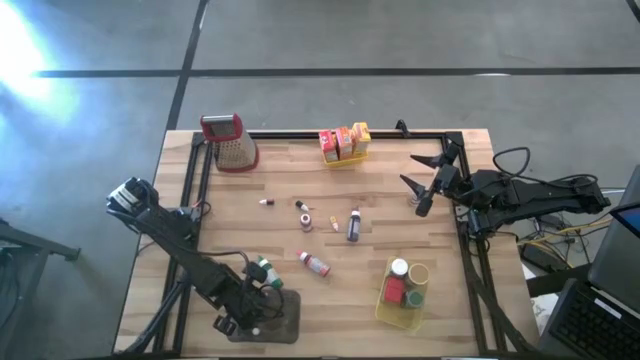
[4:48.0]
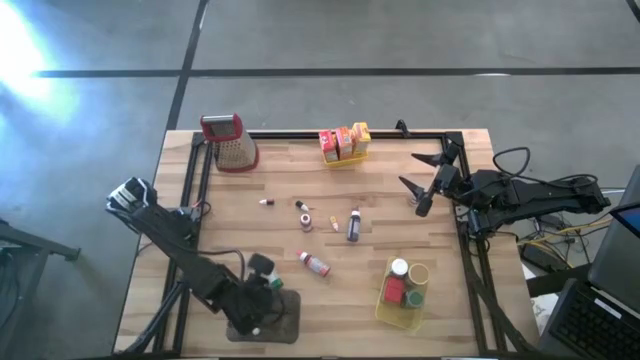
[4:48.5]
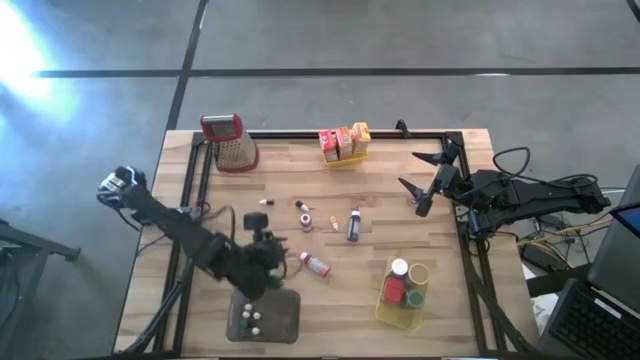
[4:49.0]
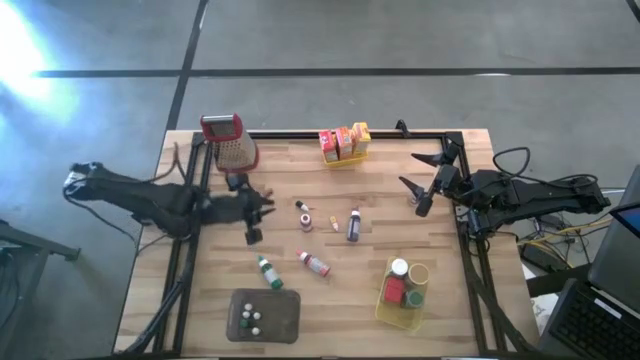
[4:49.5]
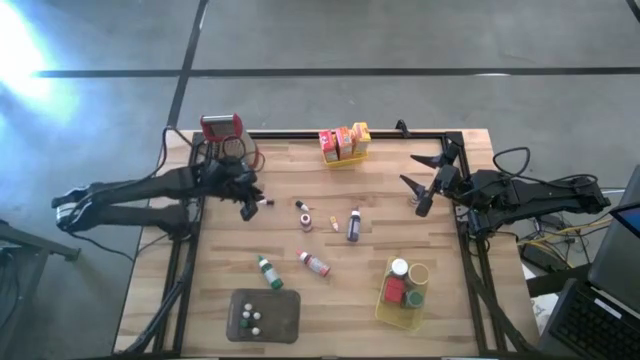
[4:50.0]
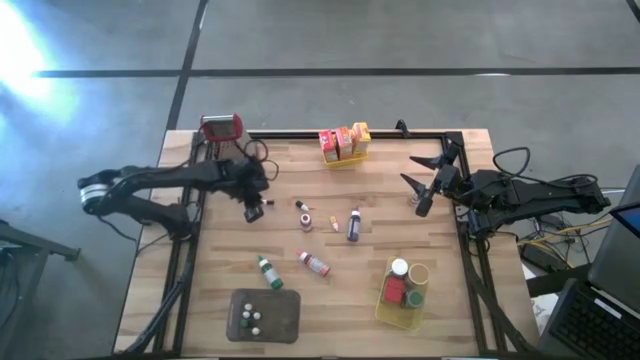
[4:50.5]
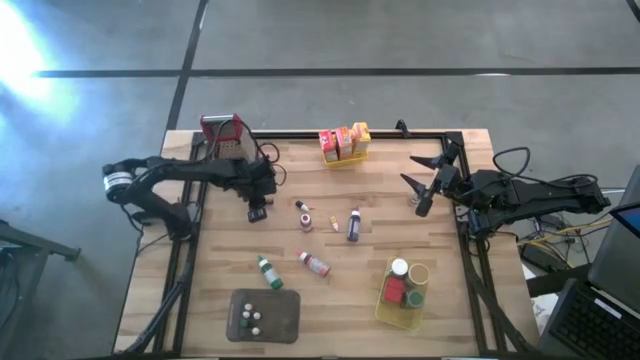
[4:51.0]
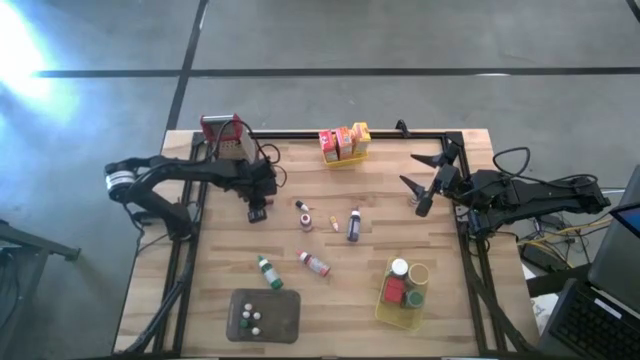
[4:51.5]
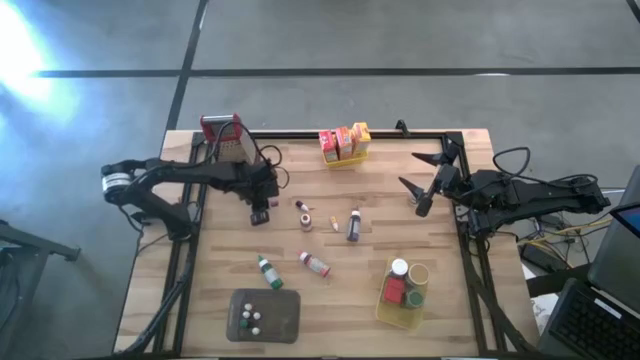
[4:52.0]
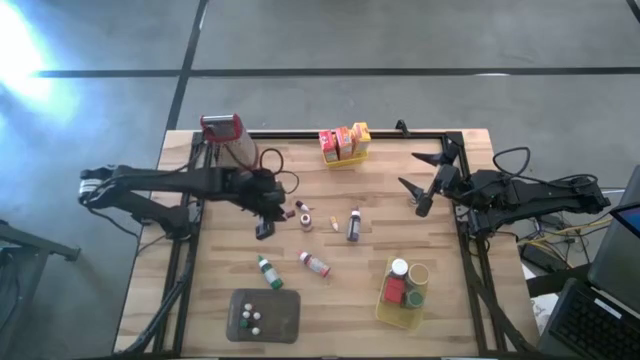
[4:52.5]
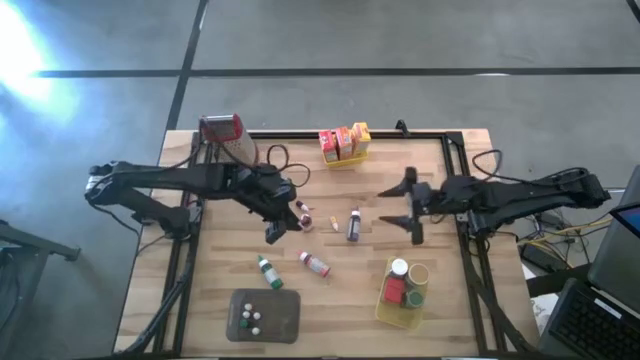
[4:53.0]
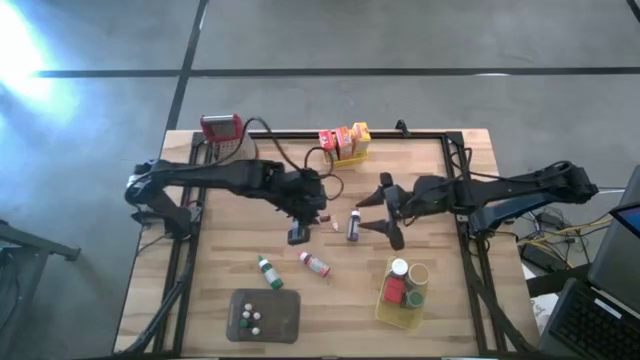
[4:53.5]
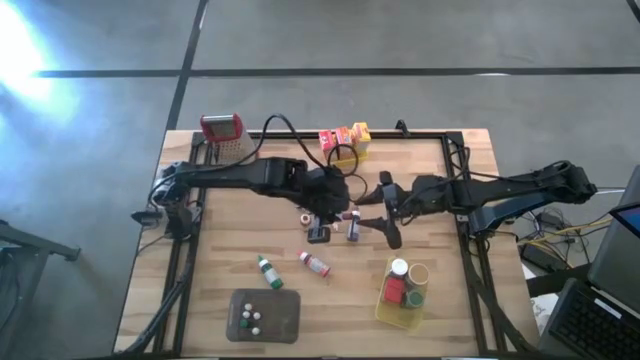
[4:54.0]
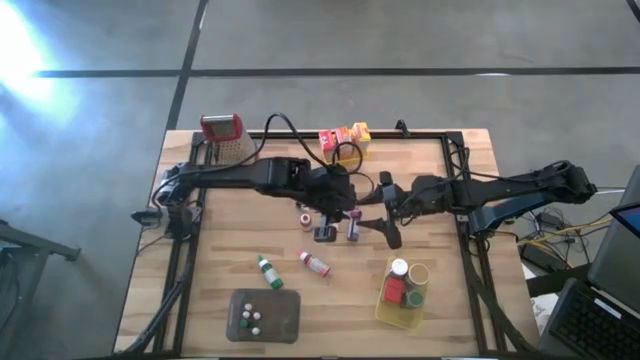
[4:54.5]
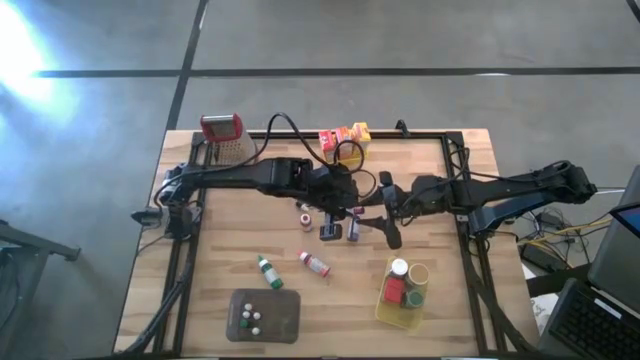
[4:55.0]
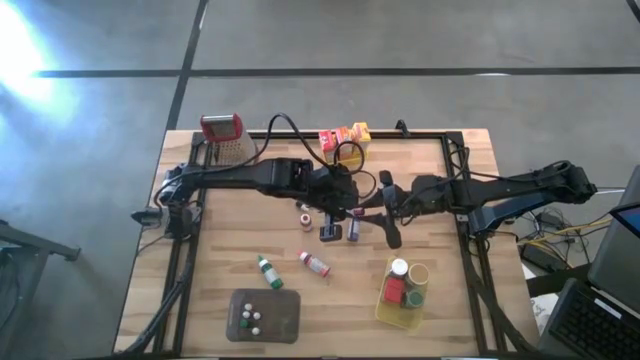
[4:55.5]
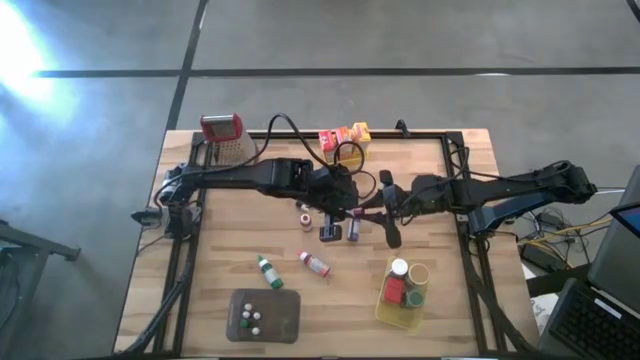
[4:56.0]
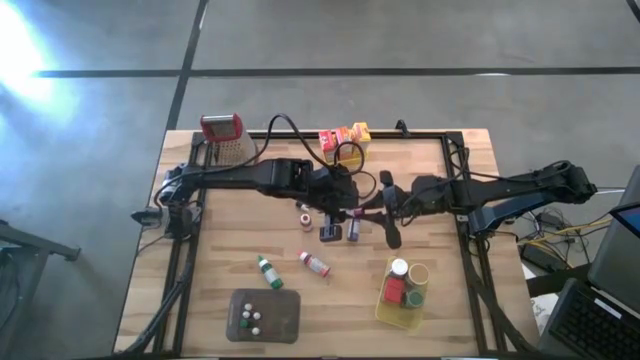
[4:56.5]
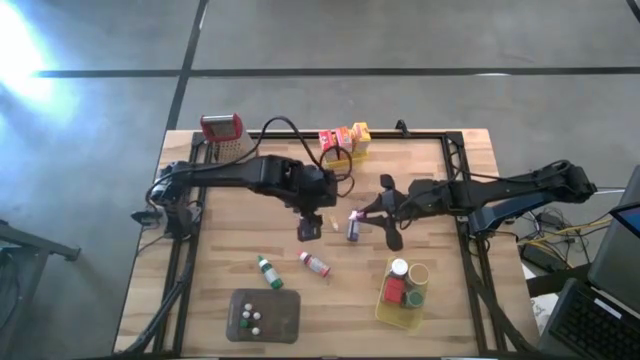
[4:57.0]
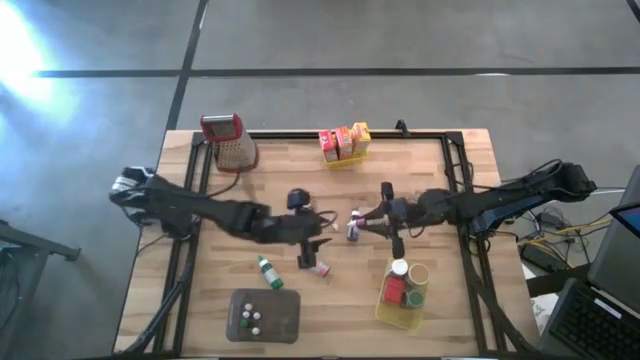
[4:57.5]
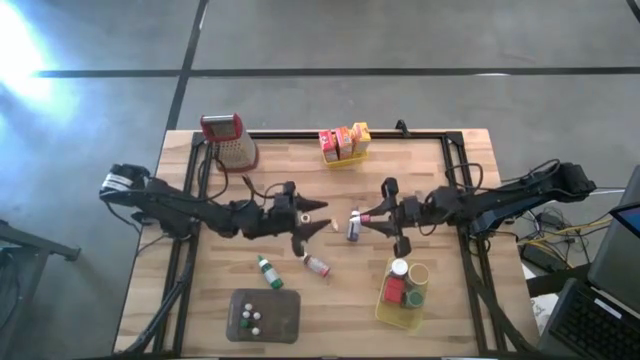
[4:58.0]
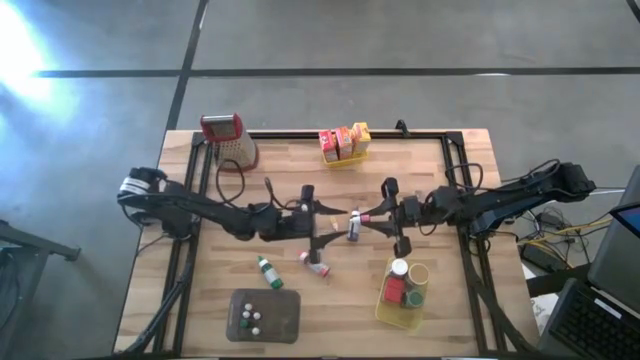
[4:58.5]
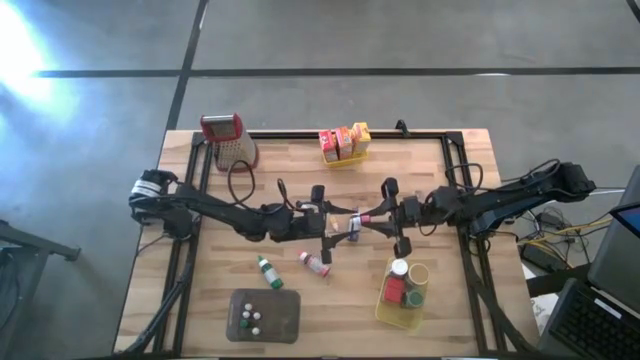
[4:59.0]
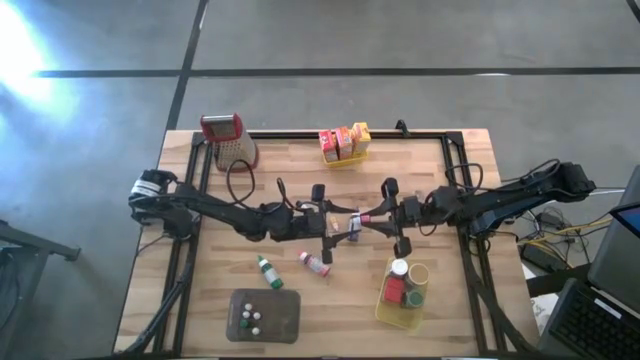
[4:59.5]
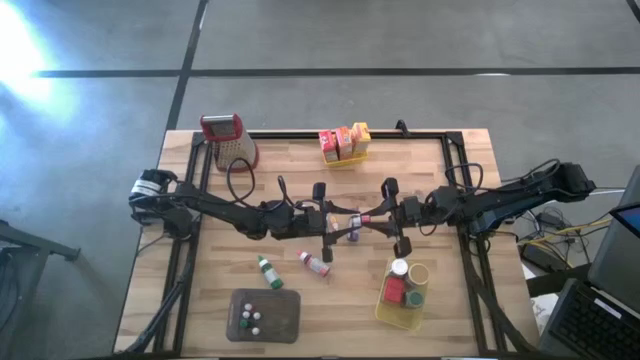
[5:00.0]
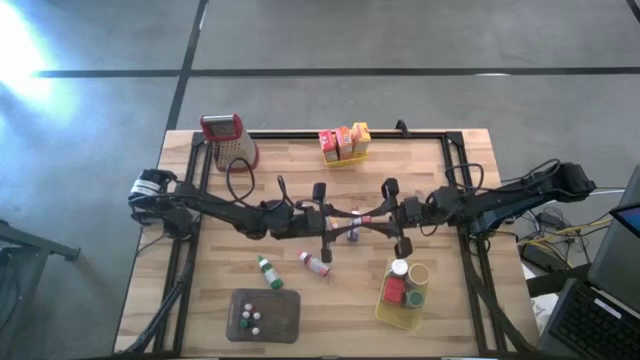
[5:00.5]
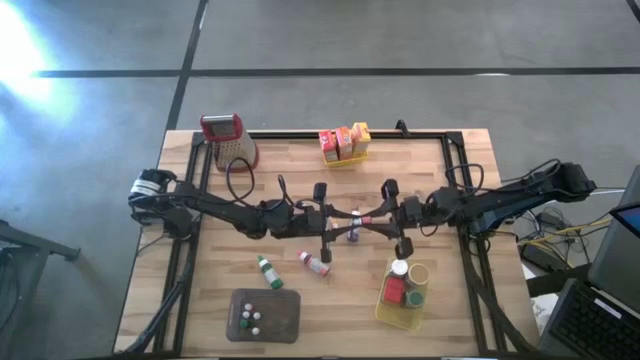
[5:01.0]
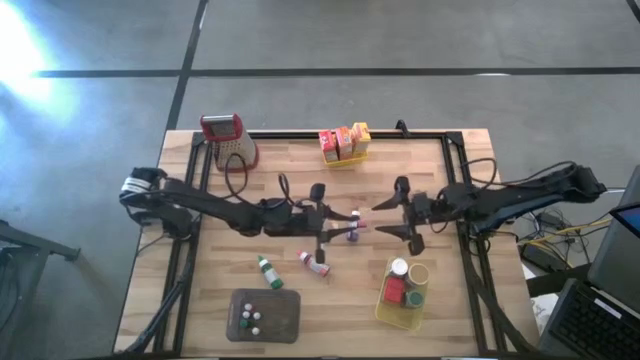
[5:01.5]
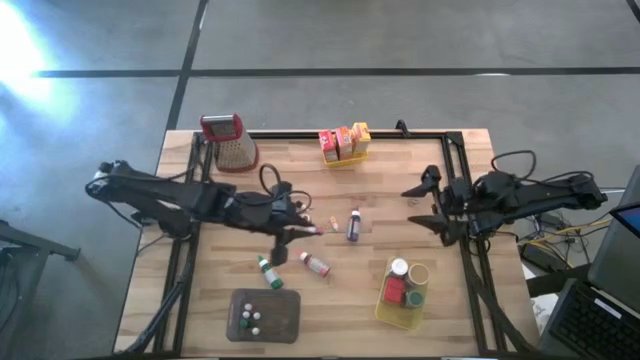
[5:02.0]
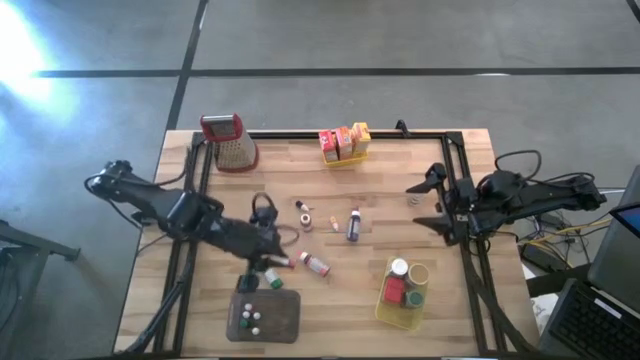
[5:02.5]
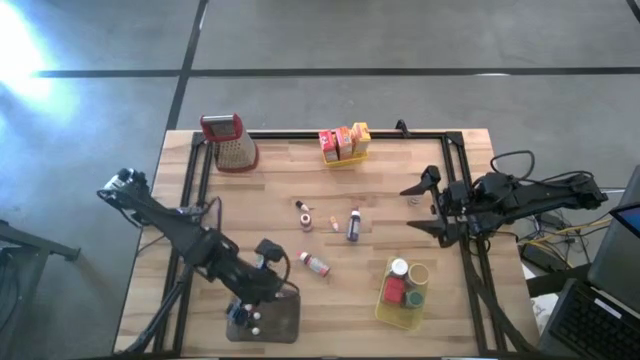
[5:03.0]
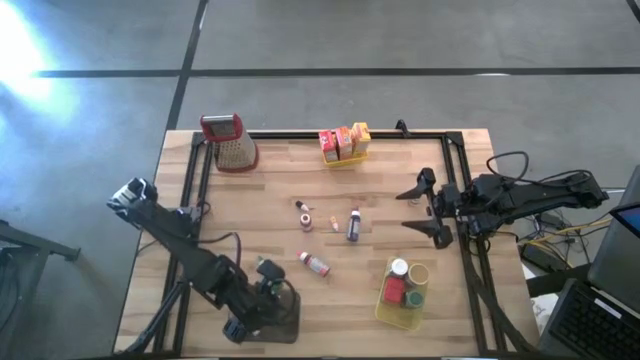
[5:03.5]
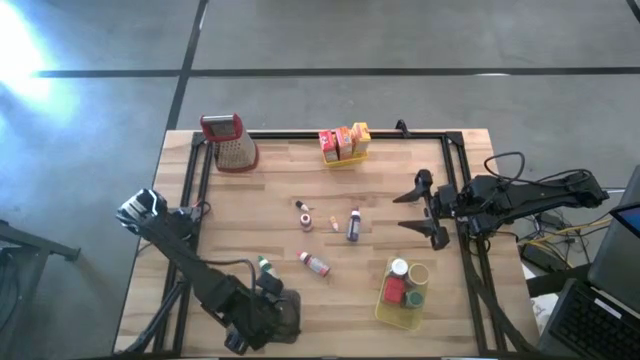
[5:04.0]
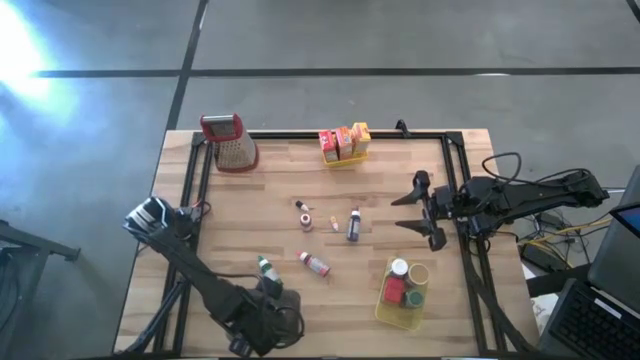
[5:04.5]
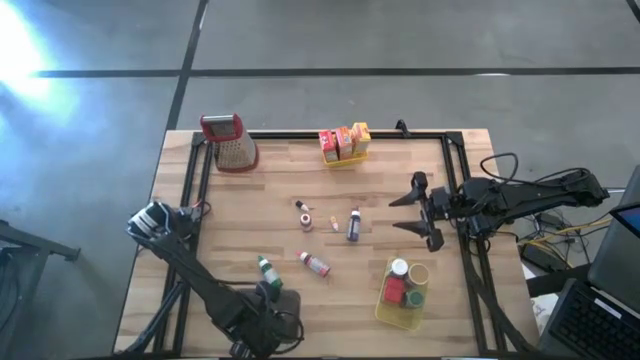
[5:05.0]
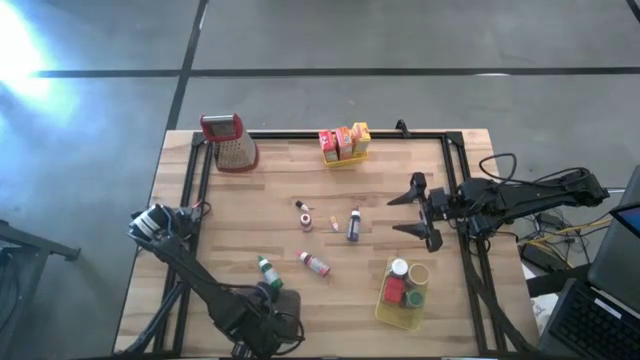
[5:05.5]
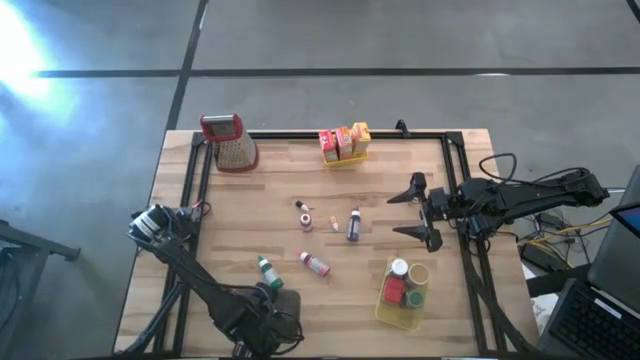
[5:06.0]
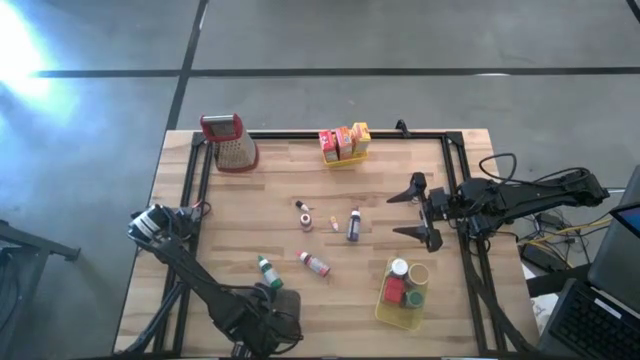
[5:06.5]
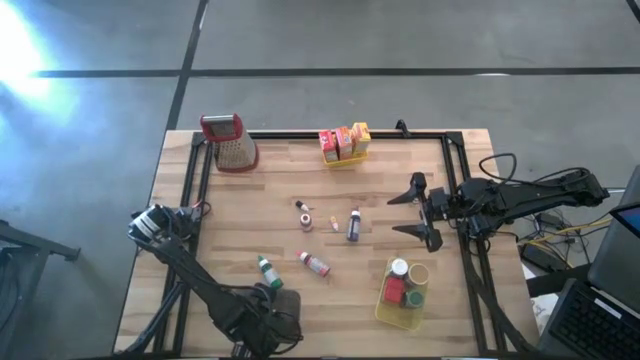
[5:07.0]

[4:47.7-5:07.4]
Task: Pick & Place Kitchen Items
Put the small pink food coloring bottle into the black bin

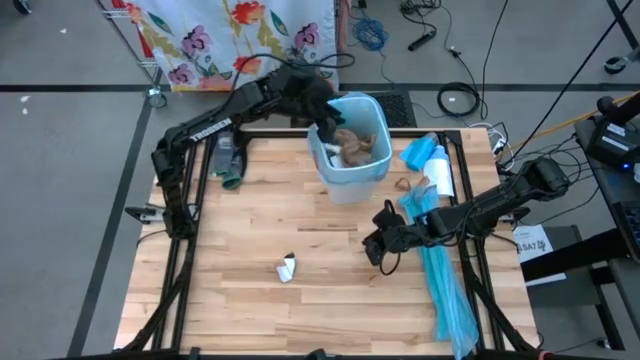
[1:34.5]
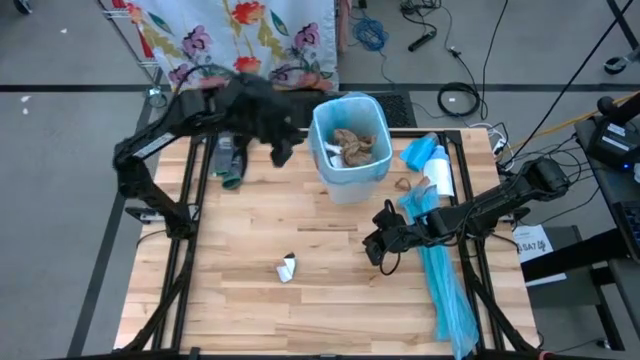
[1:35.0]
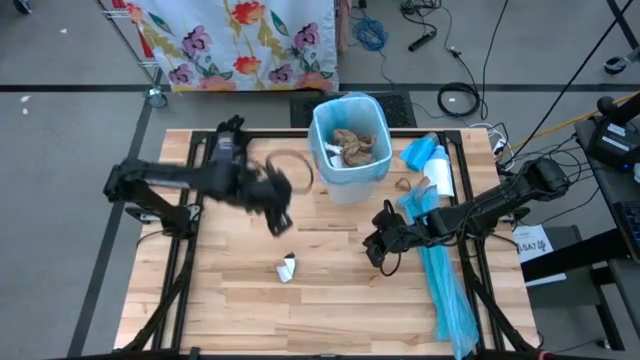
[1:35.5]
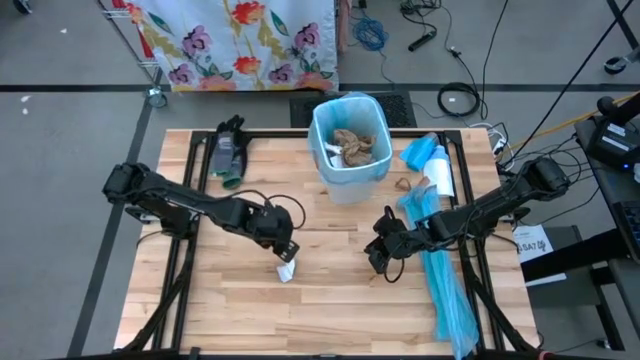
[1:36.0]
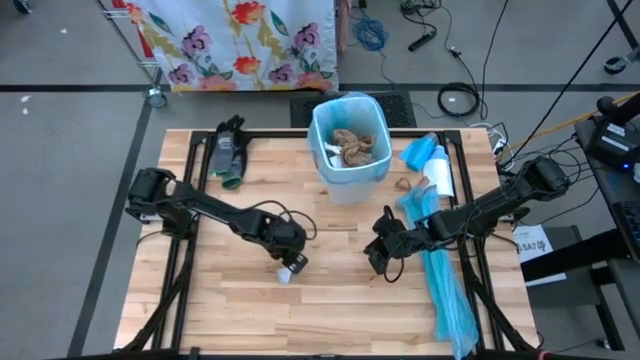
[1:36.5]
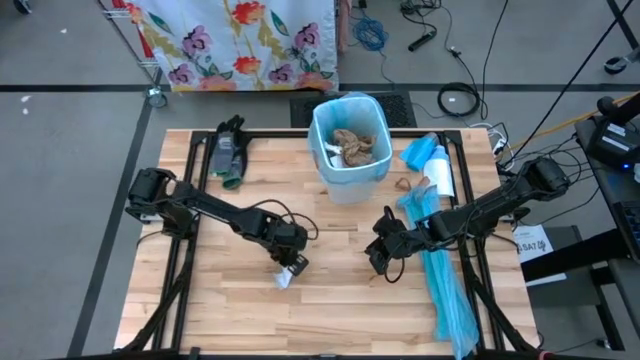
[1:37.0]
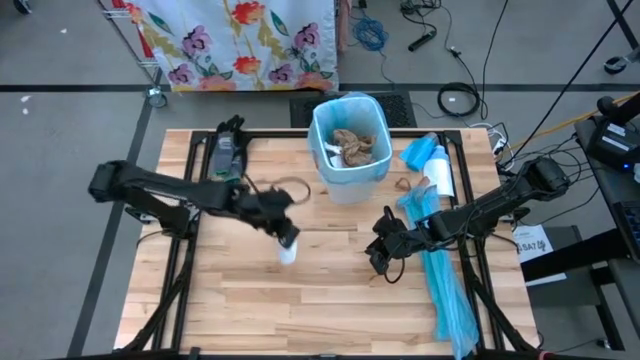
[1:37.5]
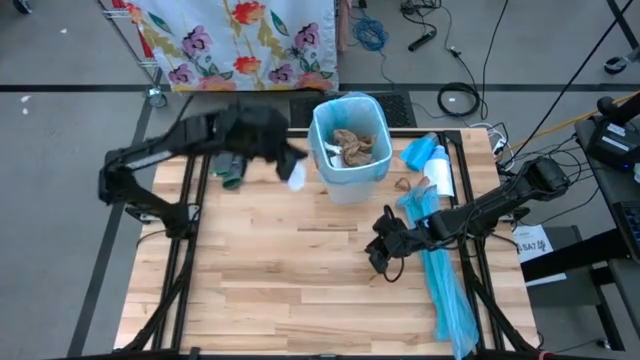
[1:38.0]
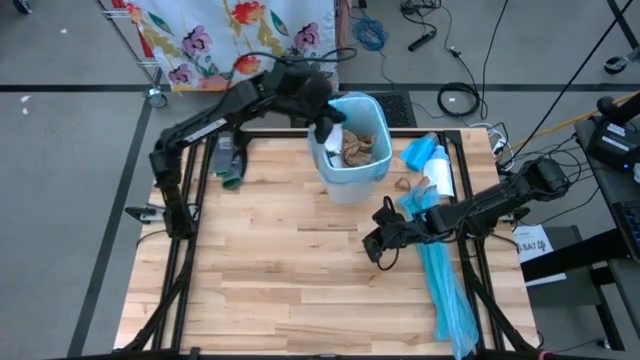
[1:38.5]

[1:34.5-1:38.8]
Task: place trash/remove bag and relplace
Put the piece of magazine into the trash bin
